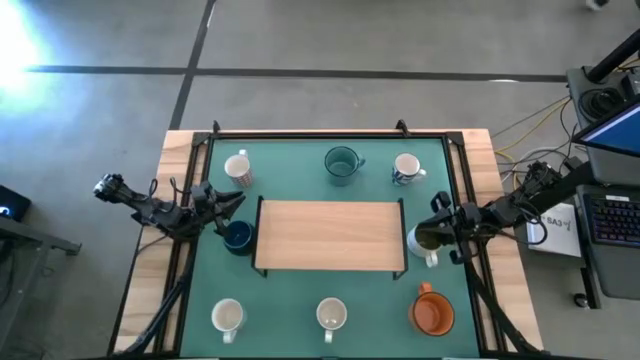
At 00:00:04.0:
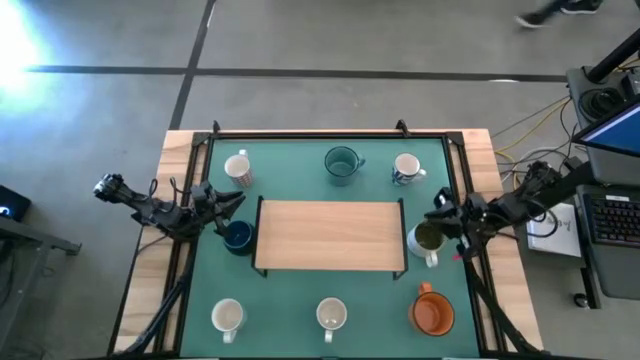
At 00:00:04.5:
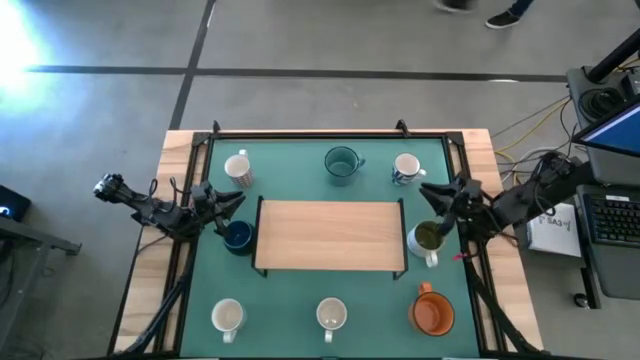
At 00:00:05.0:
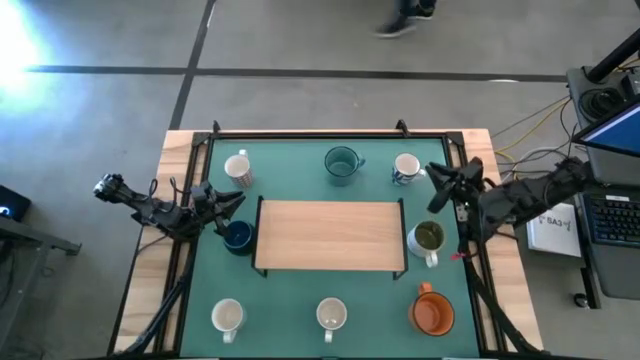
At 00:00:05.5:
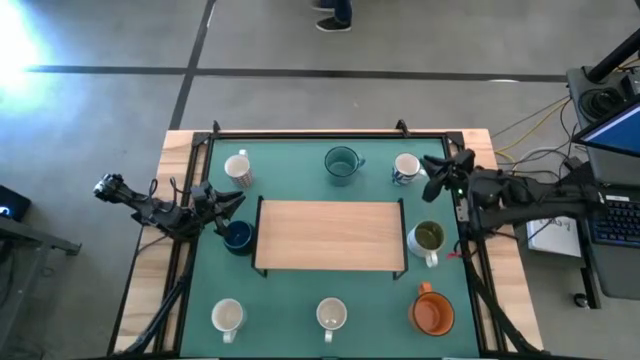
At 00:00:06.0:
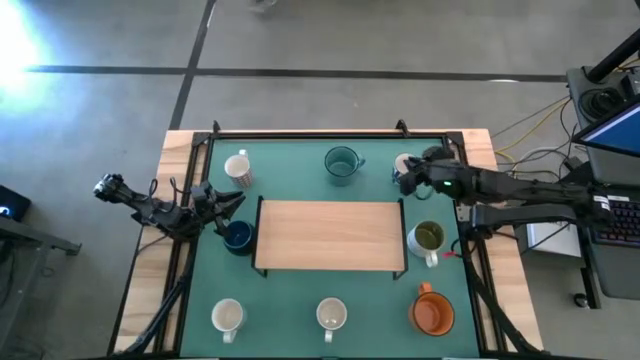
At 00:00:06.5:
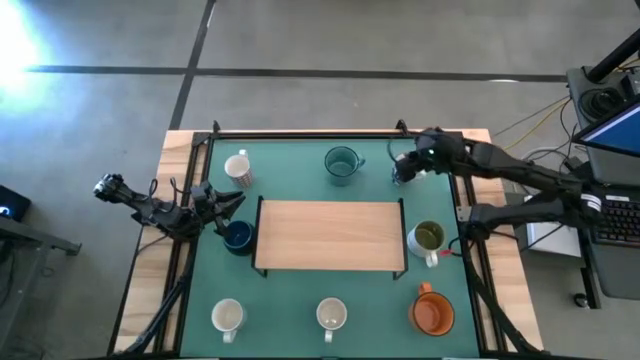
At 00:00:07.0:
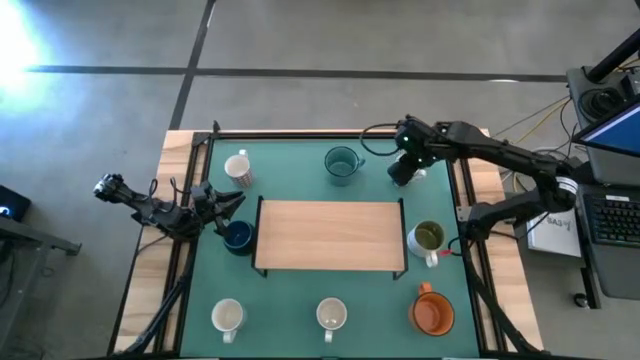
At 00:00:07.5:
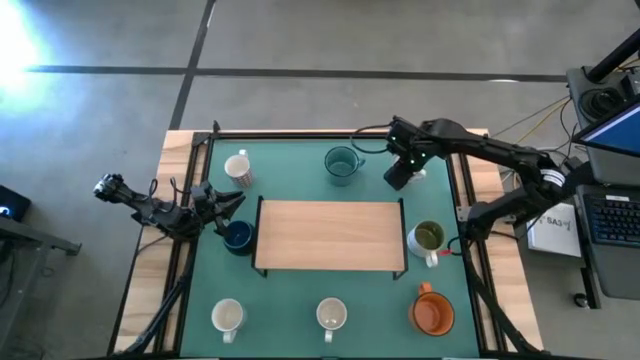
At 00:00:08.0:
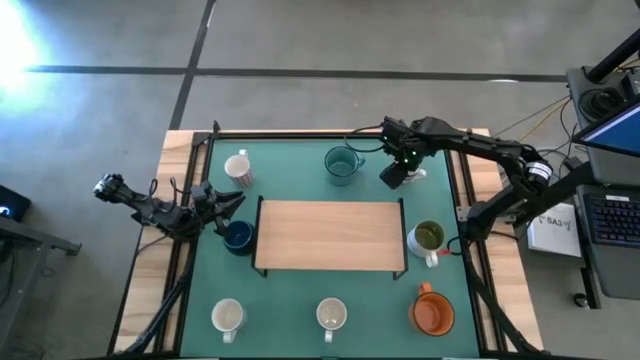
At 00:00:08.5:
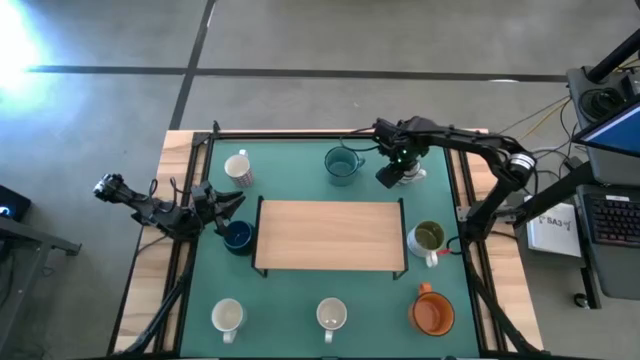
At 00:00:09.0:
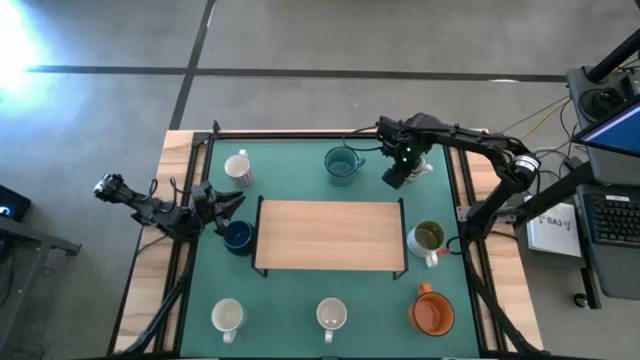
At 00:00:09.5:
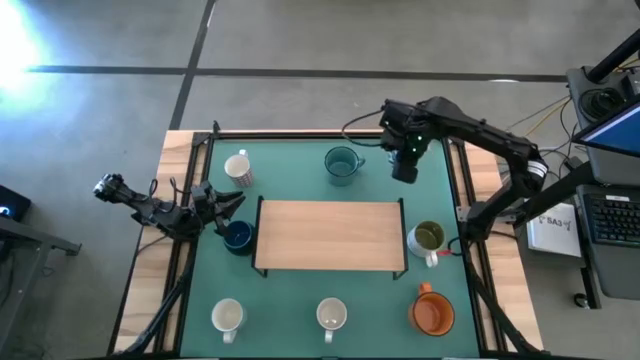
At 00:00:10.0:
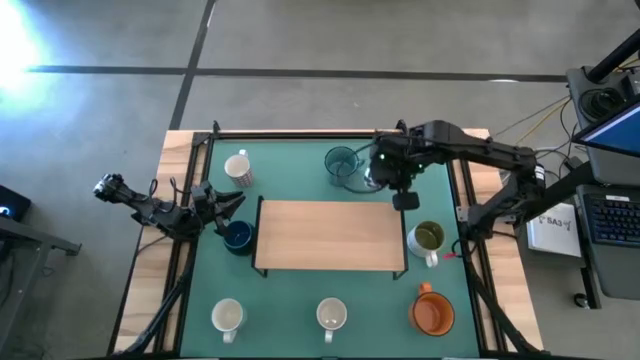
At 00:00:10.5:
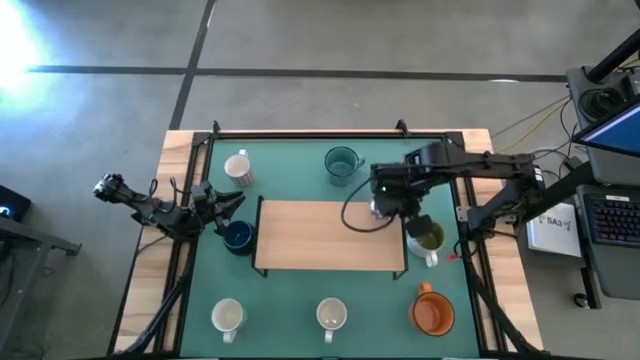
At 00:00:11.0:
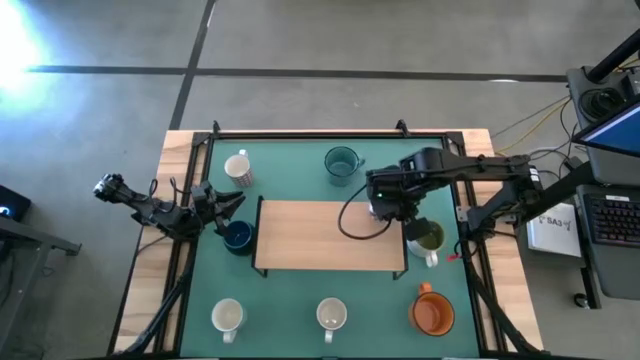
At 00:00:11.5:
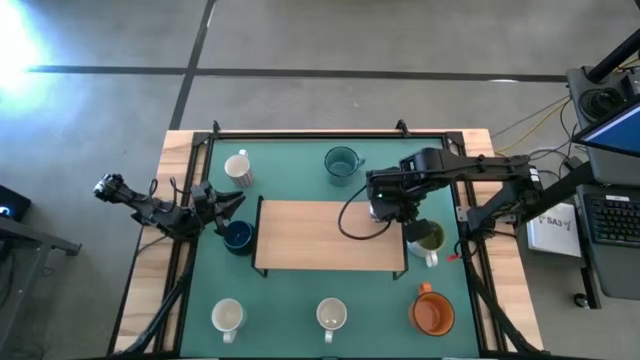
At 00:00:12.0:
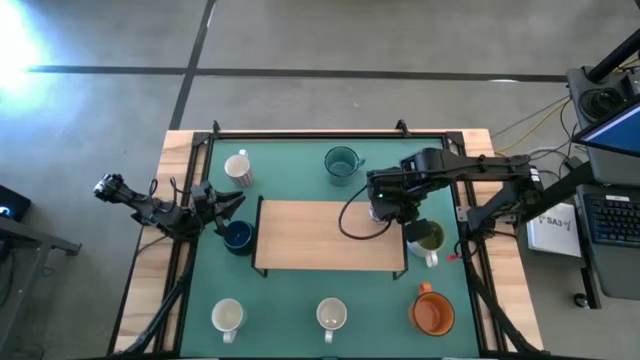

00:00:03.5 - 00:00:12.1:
Task: Place coffee mugs
Put the top blue patterned mug on the shelf

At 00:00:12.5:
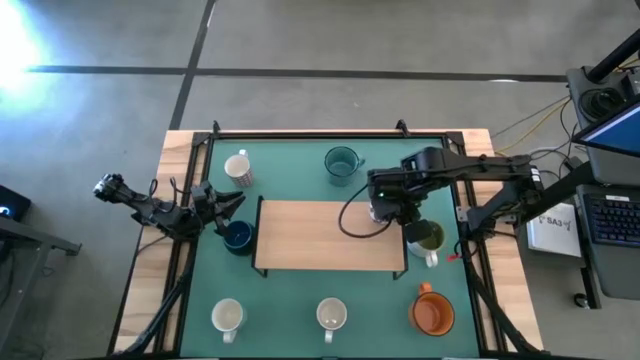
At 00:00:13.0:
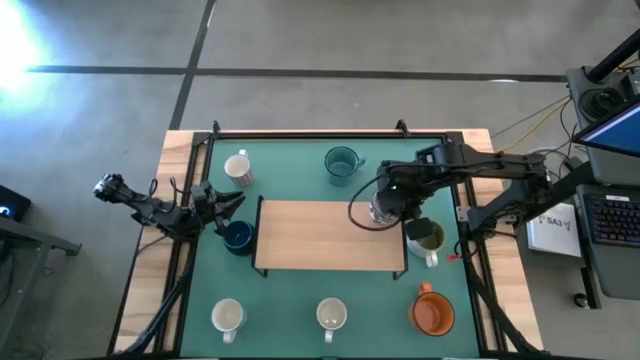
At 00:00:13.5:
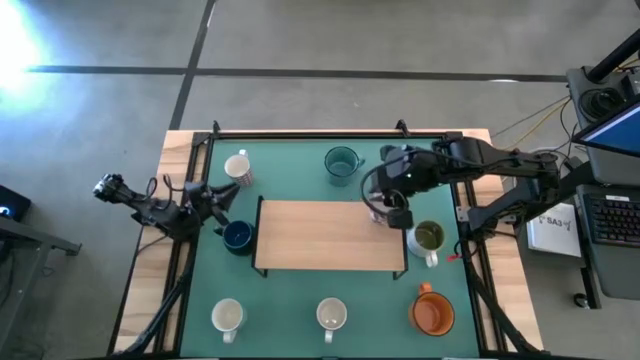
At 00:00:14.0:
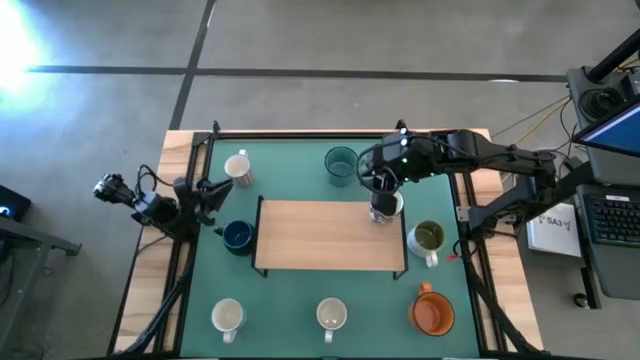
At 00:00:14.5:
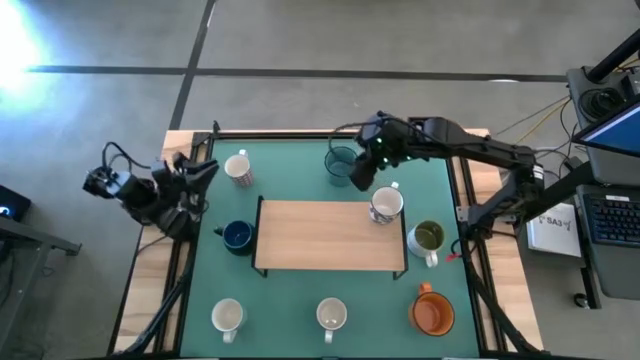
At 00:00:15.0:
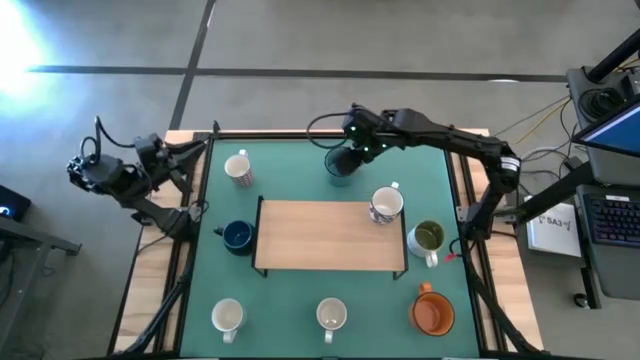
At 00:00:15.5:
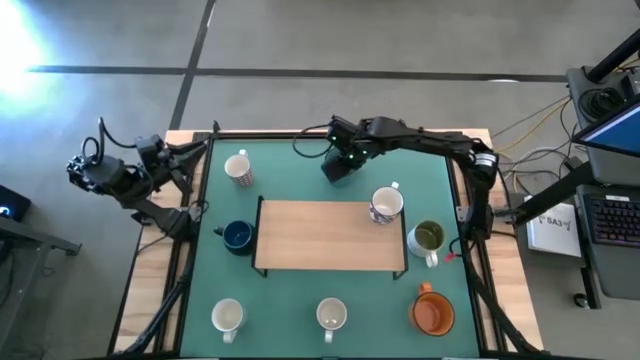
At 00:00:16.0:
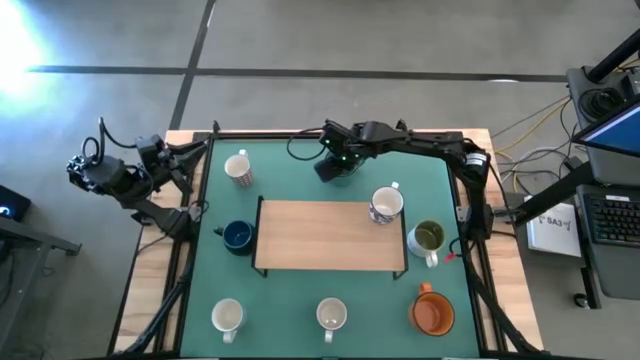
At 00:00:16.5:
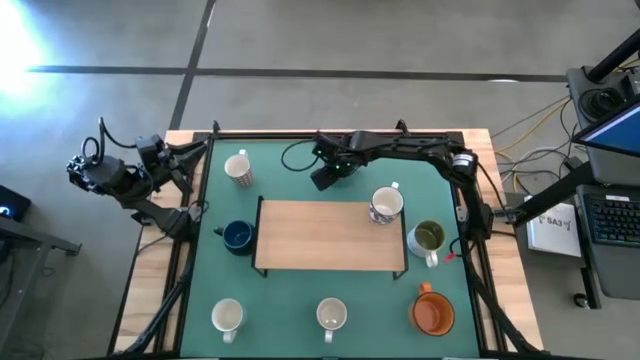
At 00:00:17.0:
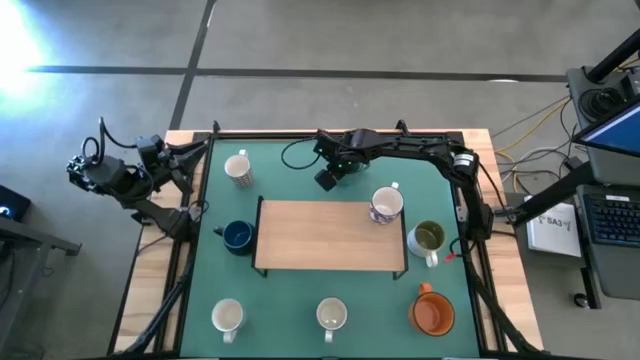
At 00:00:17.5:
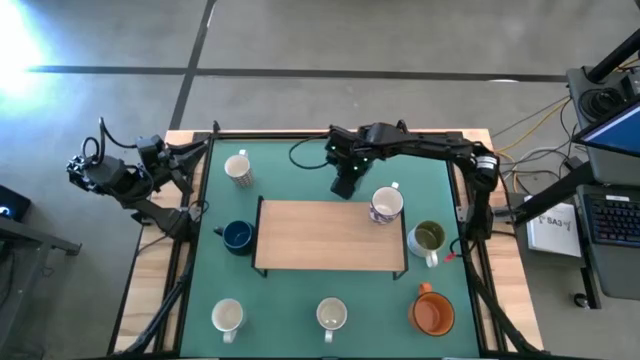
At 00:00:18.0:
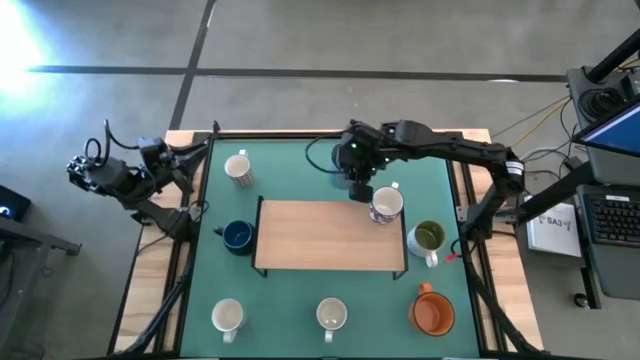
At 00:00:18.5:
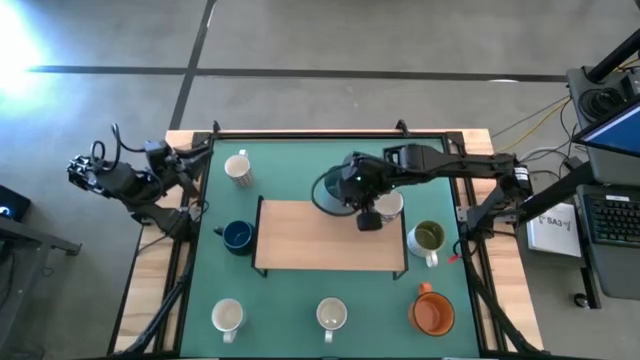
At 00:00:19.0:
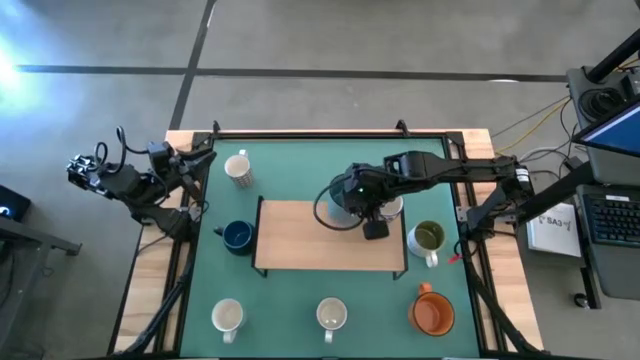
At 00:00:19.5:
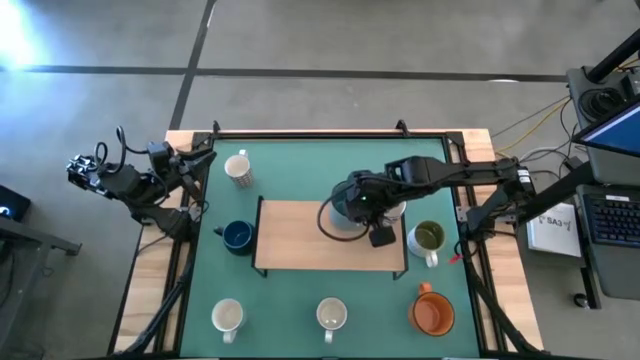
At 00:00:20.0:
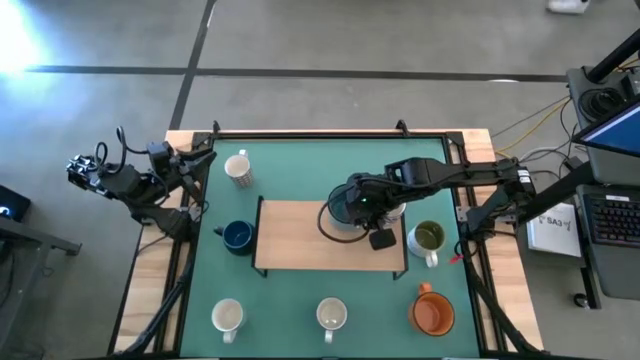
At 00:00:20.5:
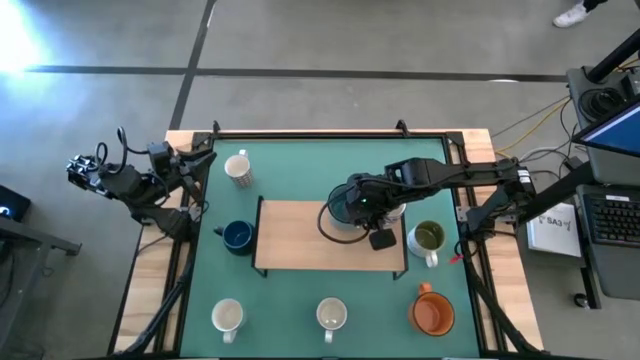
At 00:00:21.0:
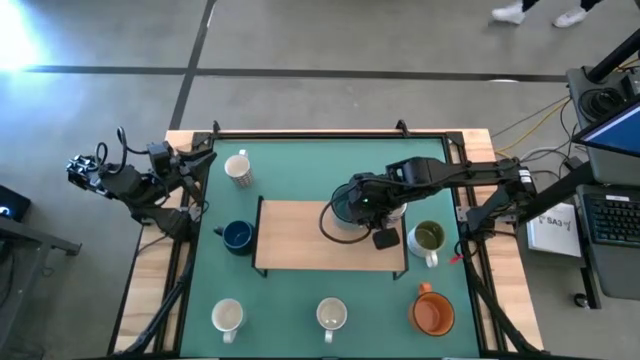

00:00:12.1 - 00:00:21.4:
Put the light blue mug on the shelf

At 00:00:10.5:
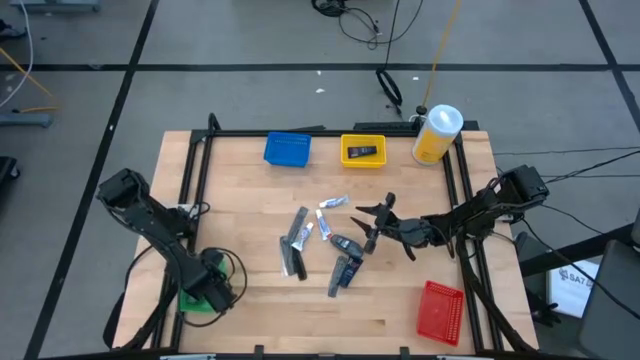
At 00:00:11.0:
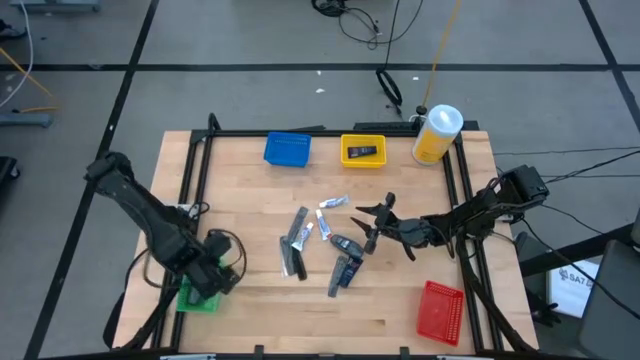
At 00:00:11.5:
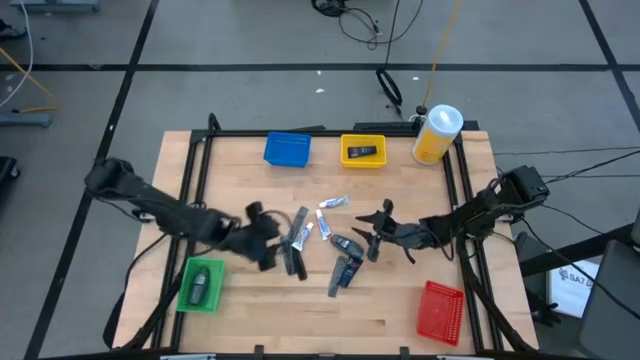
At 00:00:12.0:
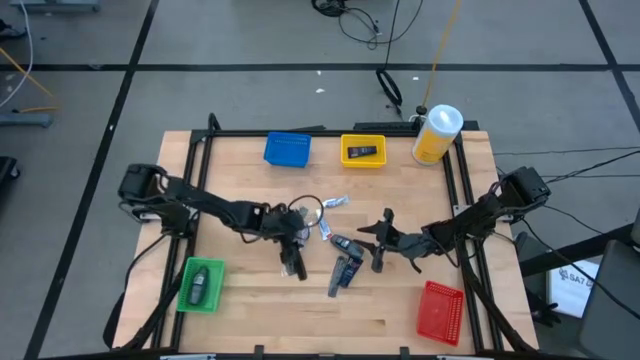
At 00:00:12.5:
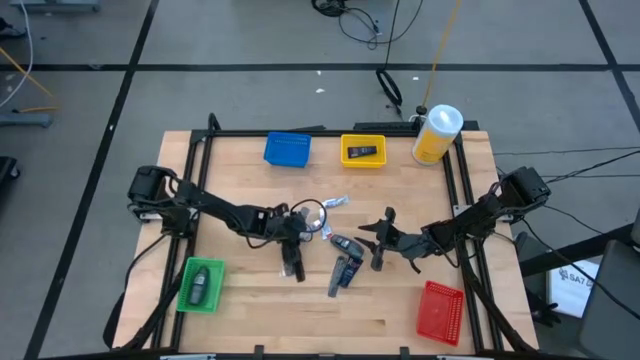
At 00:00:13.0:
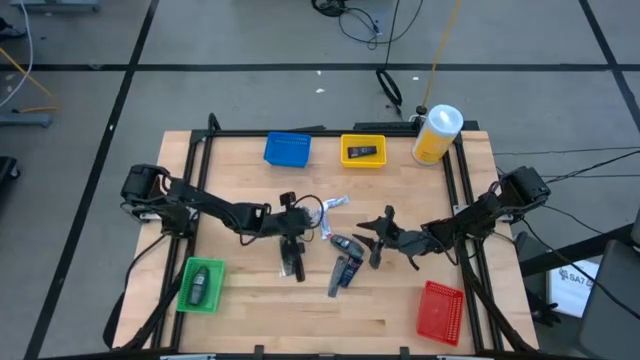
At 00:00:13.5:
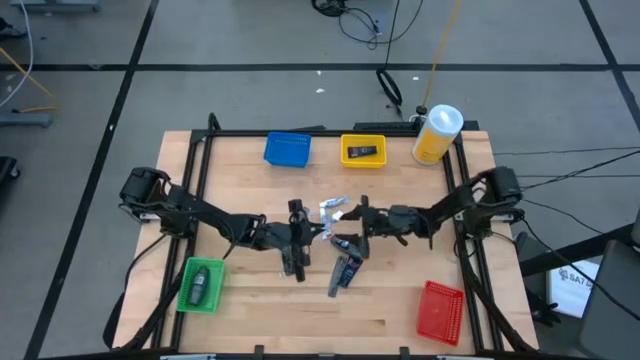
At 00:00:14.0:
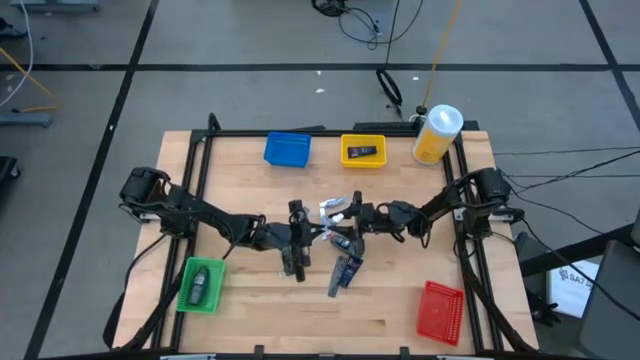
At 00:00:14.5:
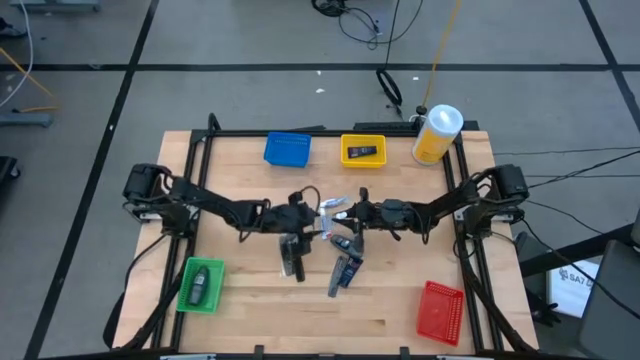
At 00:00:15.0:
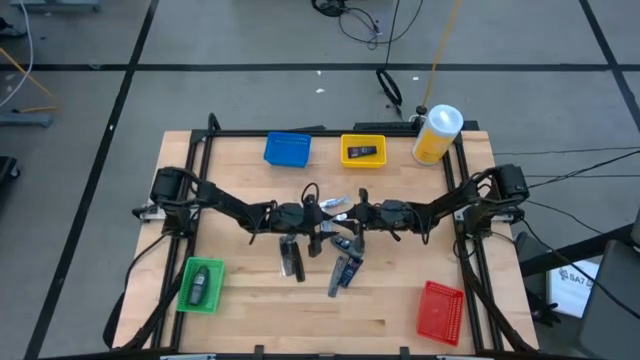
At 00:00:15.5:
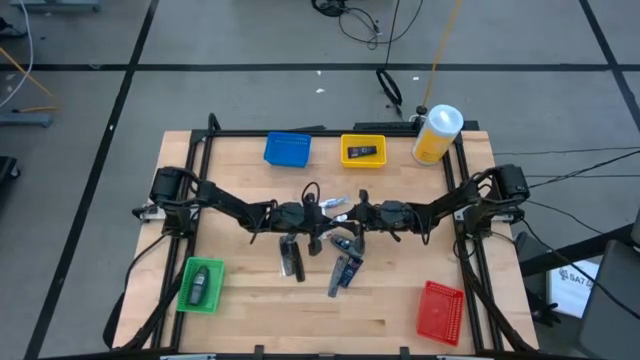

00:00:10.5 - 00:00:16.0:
Task: Pick & Place Travel size toiletries
Put the white toothpaste into the blue bin
